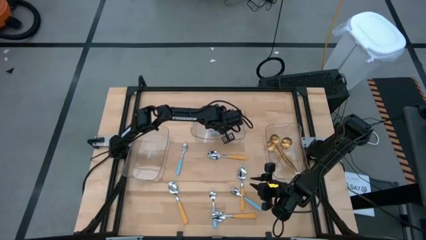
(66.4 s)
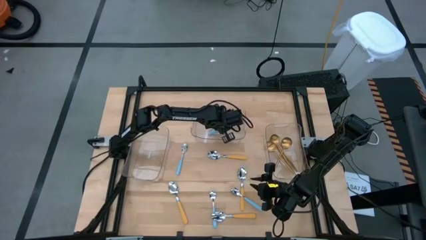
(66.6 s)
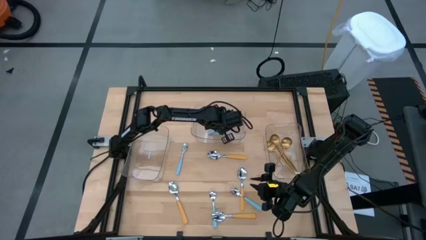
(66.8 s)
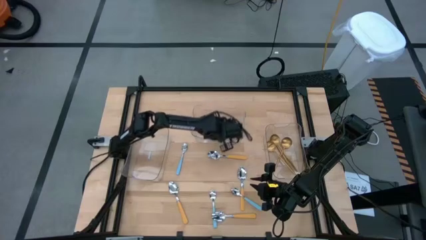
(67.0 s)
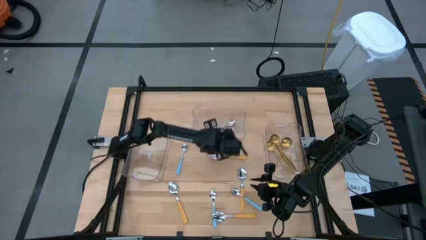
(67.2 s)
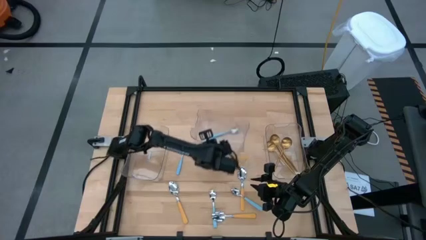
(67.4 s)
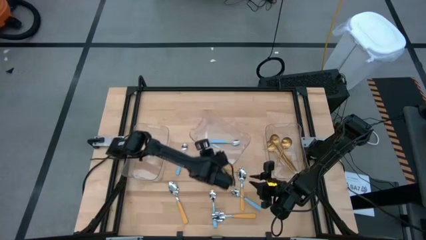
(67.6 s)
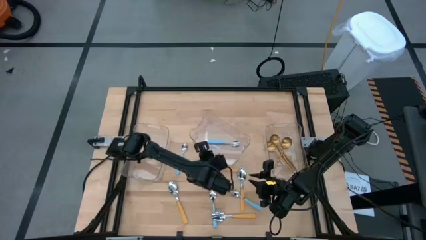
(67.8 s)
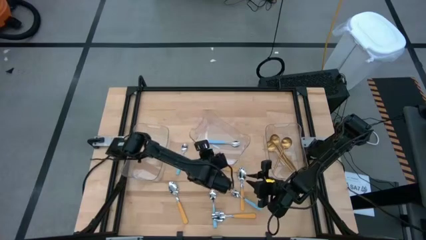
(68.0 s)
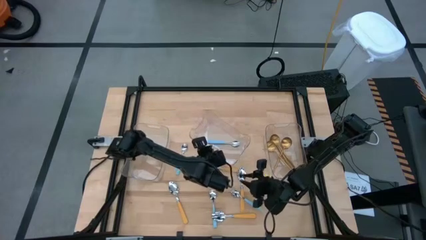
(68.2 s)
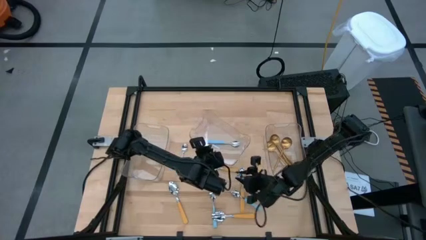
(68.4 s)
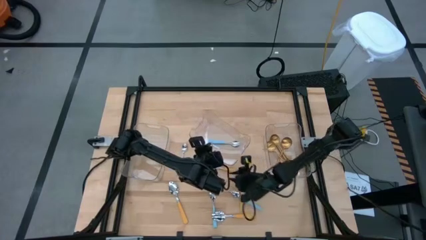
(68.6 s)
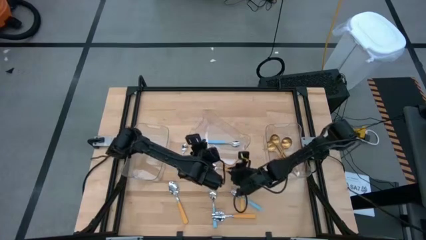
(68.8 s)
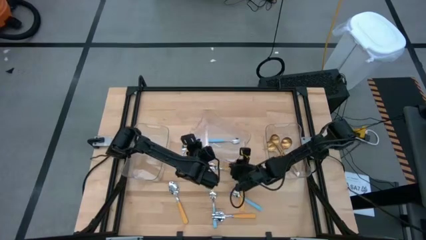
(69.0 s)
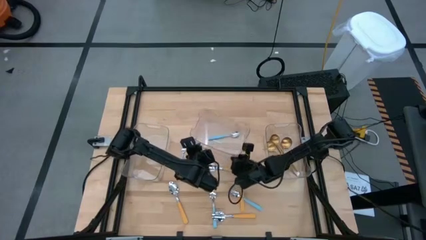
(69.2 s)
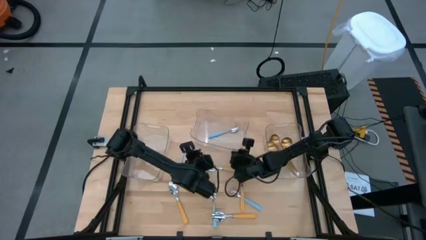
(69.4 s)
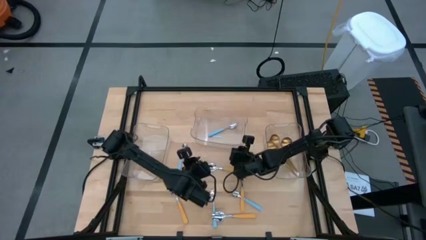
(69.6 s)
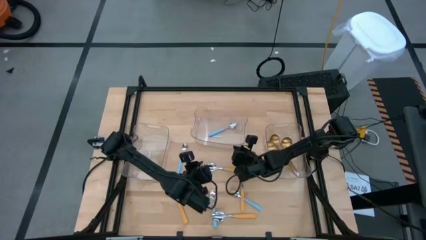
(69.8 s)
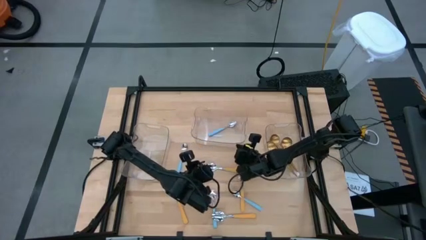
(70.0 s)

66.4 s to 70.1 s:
Task: Sort silverware by color (type)
Adjust the top center transparent bin

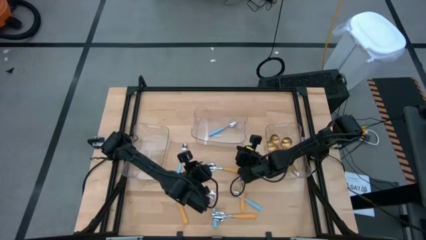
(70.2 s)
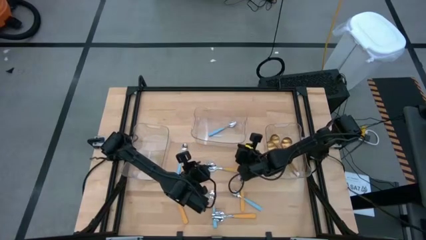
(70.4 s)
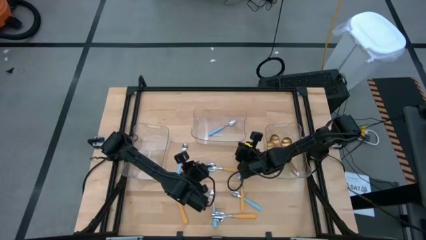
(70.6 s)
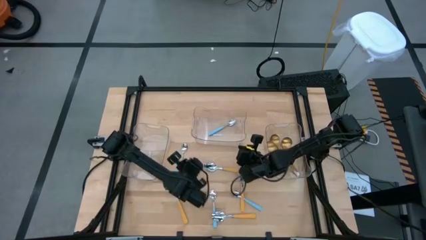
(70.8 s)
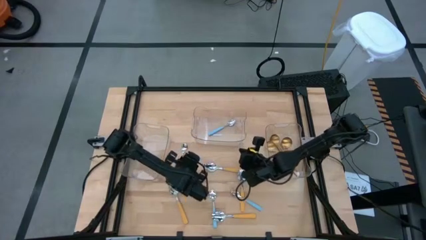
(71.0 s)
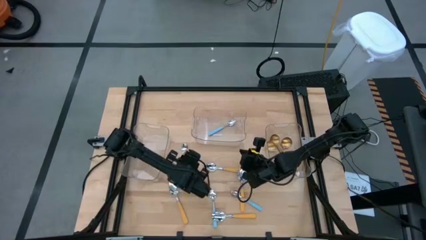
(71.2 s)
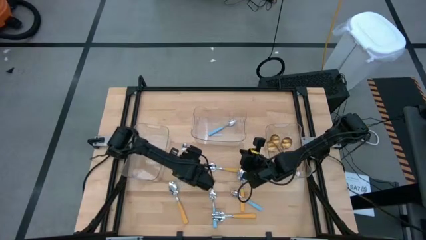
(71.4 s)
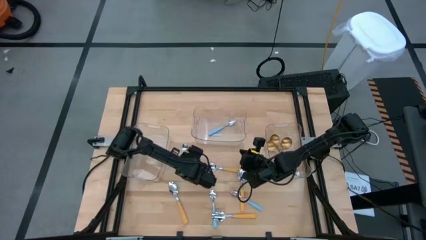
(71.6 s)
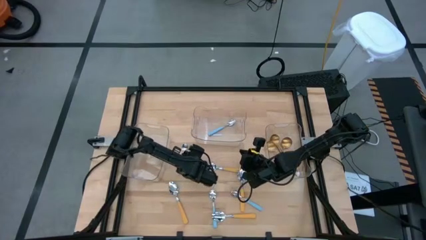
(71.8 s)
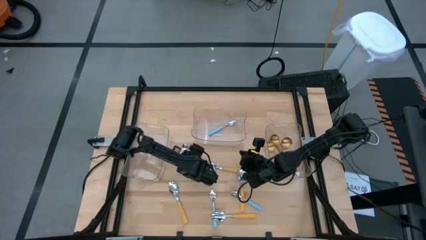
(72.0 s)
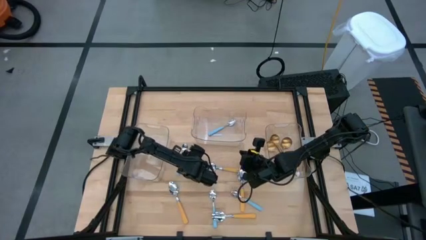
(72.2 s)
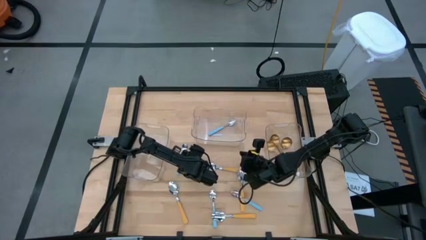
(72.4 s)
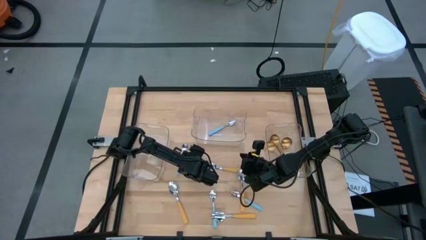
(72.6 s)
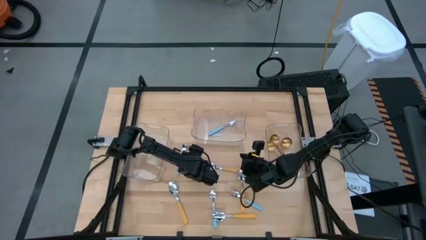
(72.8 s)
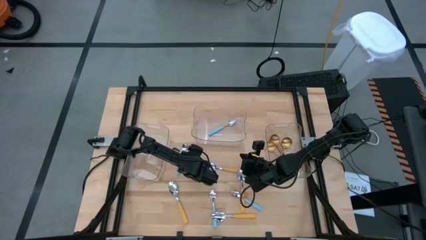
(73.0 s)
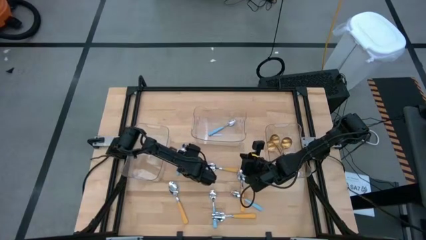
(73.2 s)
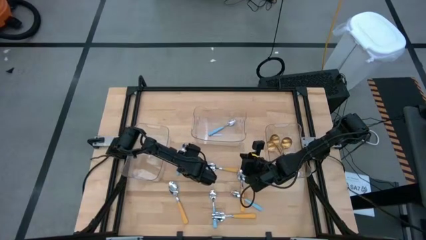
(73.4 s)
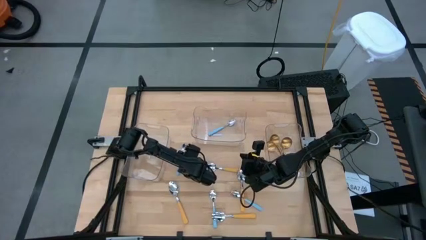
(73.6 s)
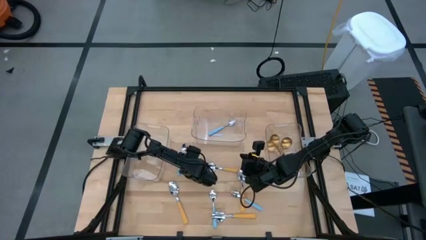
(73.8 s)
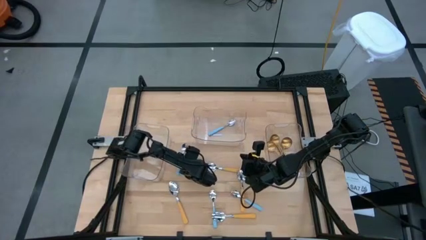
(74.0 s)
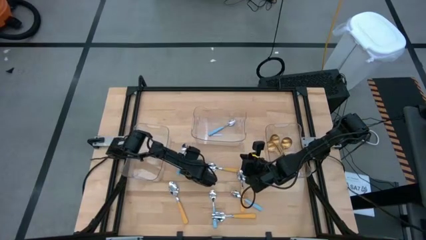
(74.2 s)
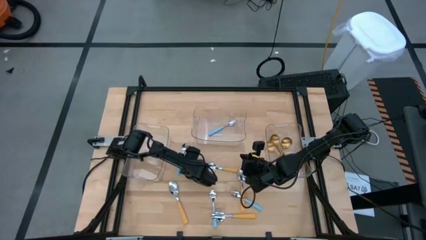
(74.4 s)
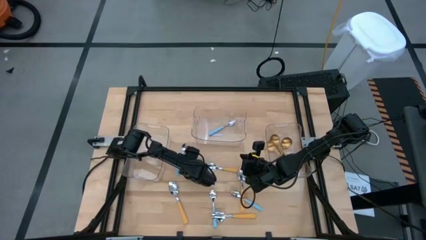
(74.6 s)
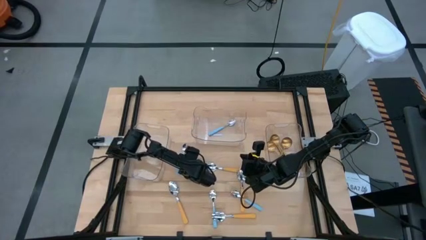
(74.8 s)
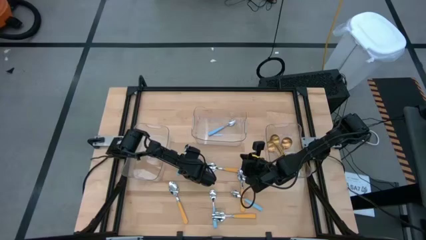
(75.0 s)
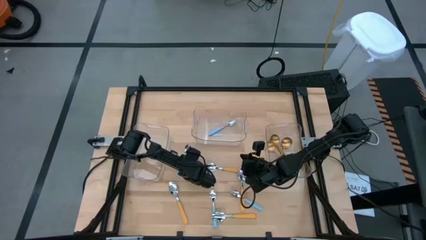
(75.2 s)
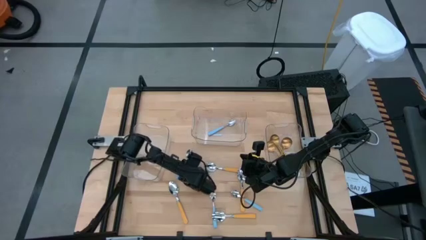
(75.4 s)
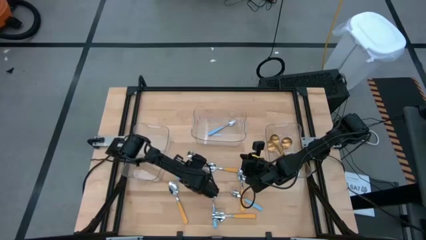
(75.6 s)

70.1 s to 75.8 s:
Put the blue spoon into the top transparent bin
